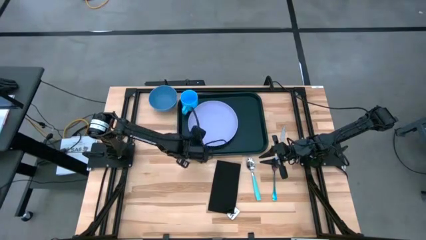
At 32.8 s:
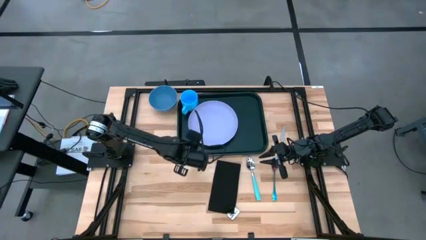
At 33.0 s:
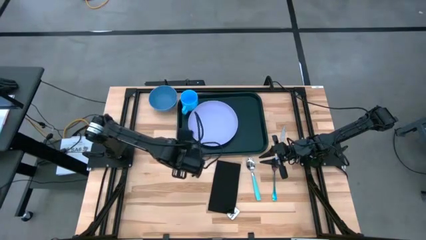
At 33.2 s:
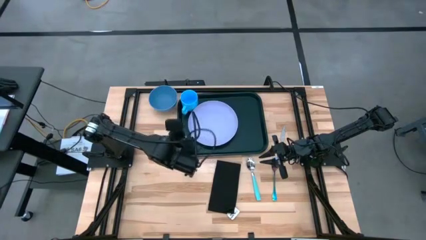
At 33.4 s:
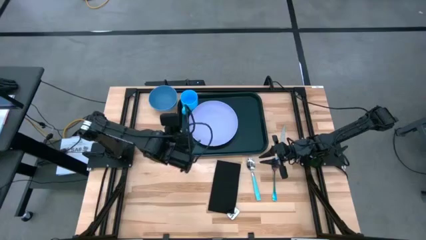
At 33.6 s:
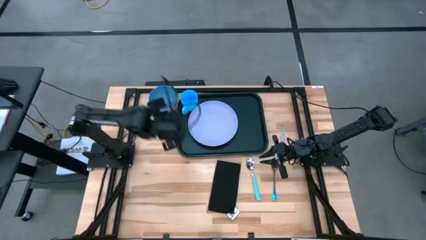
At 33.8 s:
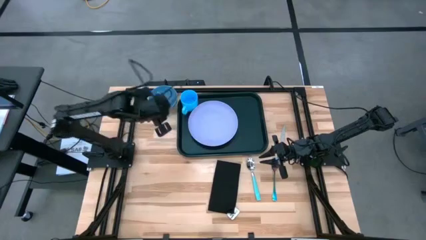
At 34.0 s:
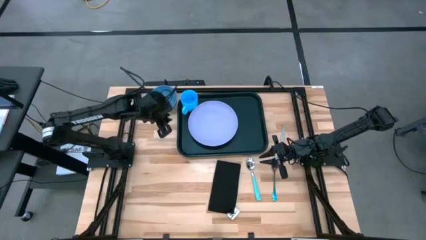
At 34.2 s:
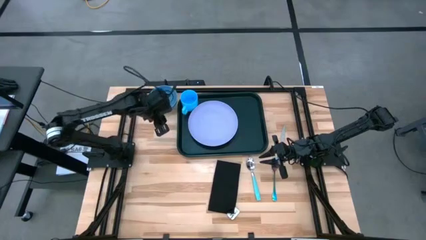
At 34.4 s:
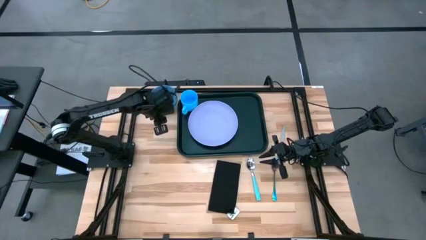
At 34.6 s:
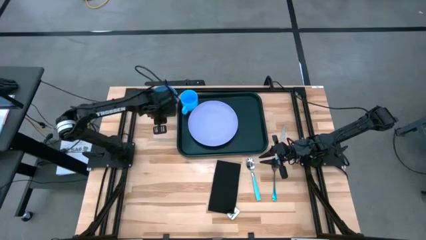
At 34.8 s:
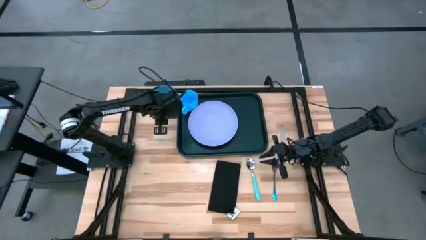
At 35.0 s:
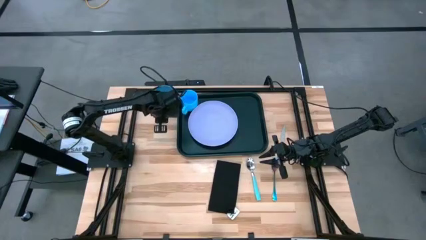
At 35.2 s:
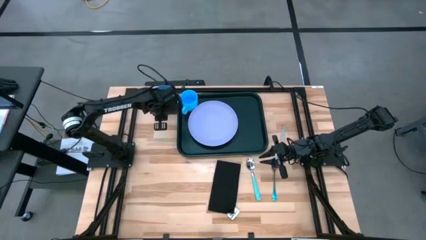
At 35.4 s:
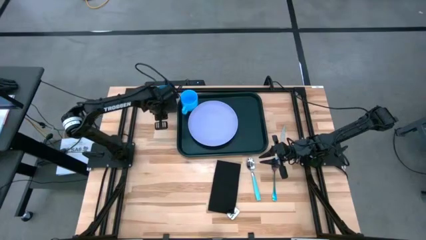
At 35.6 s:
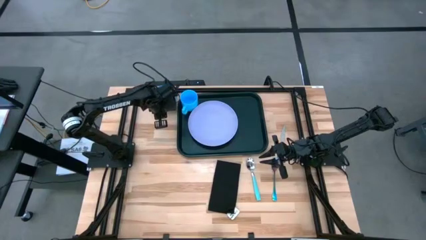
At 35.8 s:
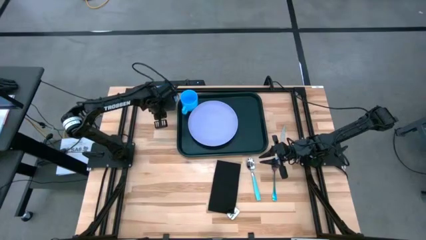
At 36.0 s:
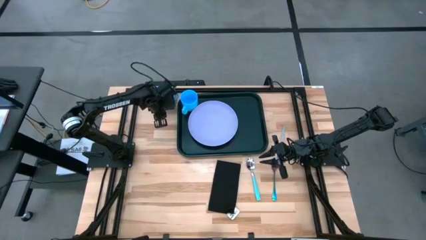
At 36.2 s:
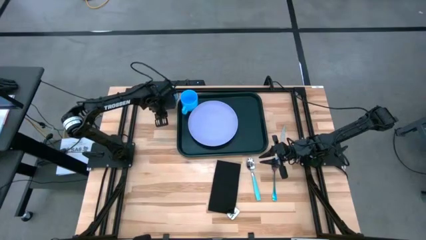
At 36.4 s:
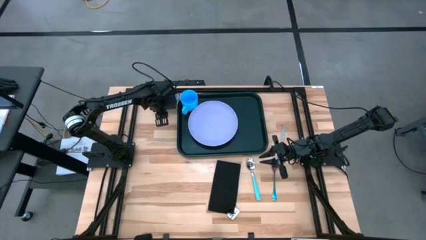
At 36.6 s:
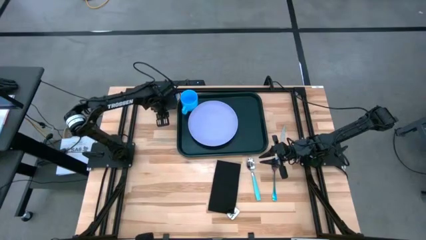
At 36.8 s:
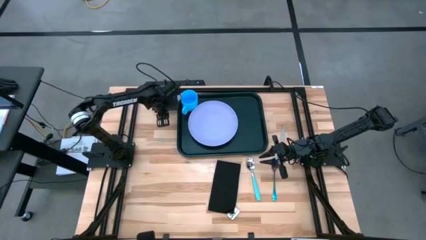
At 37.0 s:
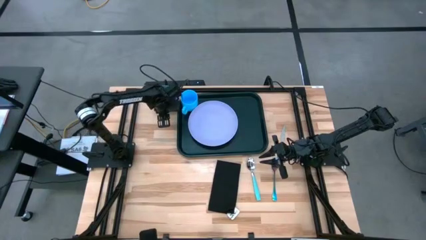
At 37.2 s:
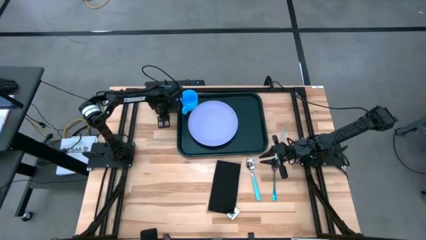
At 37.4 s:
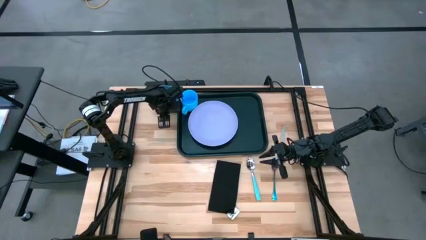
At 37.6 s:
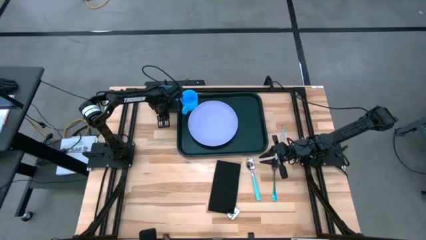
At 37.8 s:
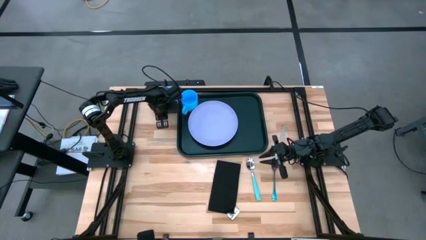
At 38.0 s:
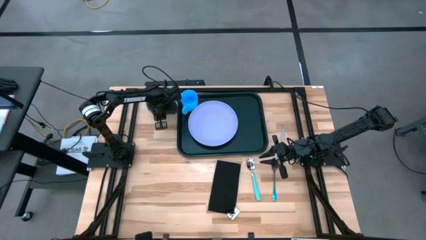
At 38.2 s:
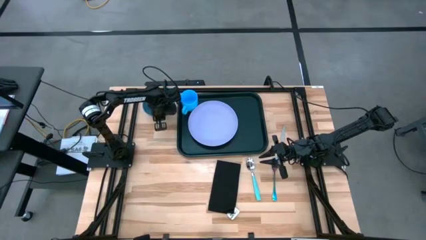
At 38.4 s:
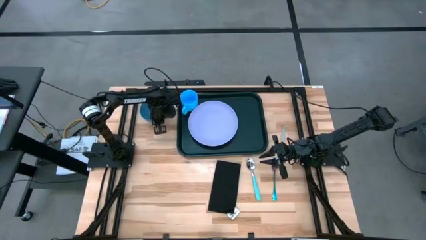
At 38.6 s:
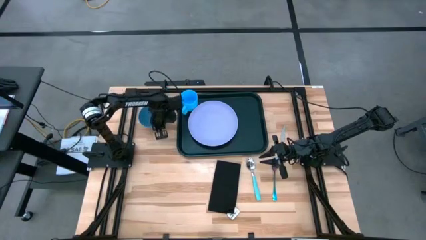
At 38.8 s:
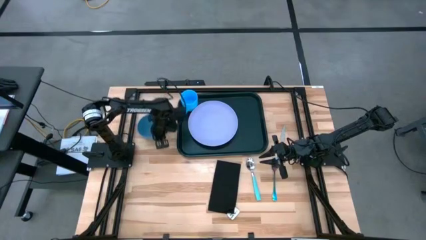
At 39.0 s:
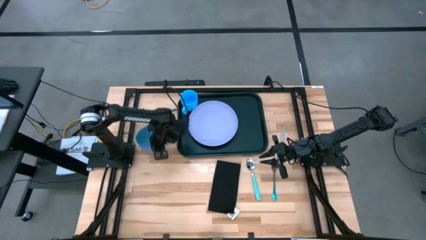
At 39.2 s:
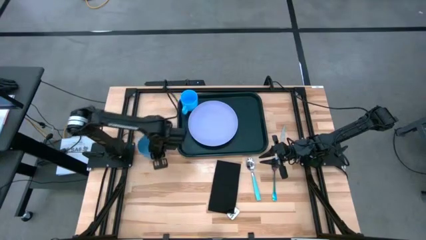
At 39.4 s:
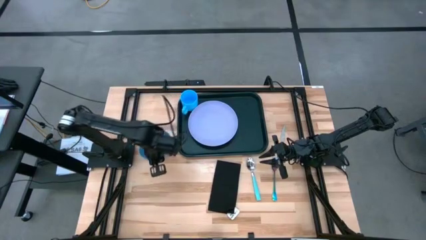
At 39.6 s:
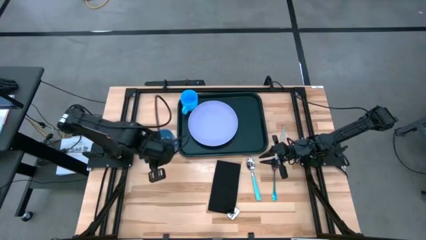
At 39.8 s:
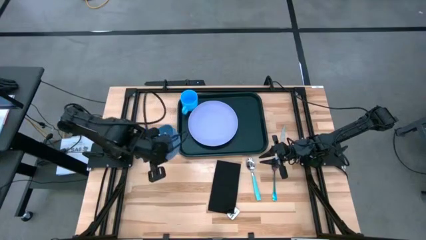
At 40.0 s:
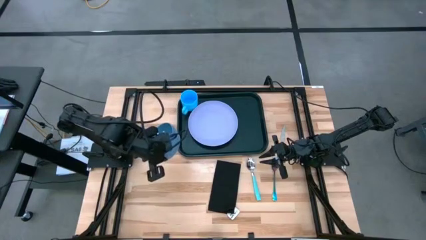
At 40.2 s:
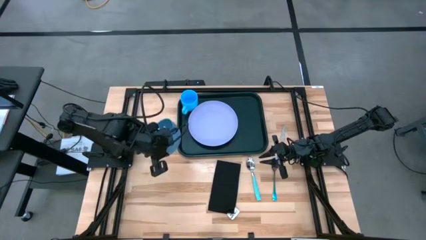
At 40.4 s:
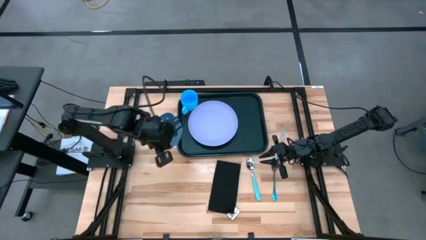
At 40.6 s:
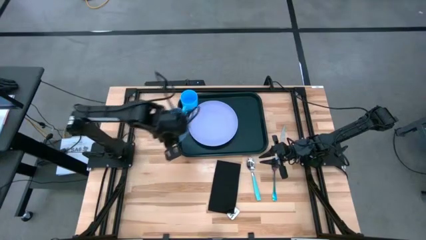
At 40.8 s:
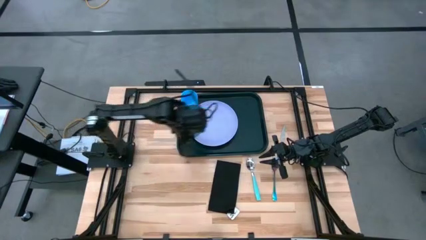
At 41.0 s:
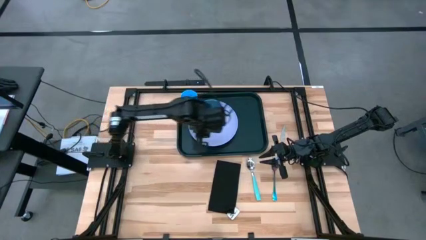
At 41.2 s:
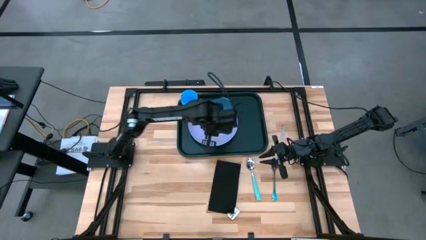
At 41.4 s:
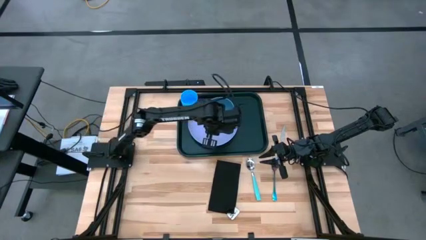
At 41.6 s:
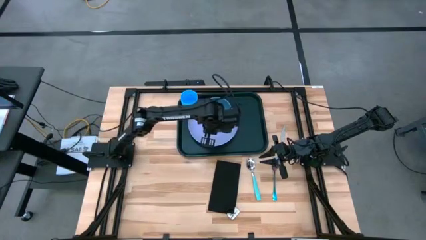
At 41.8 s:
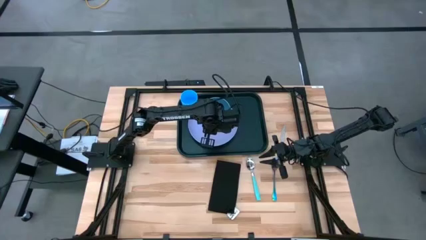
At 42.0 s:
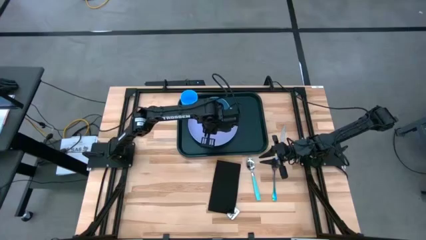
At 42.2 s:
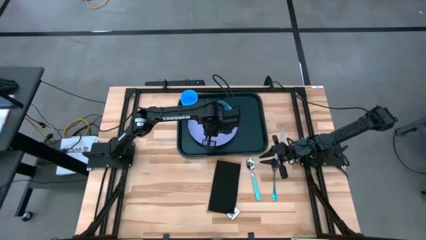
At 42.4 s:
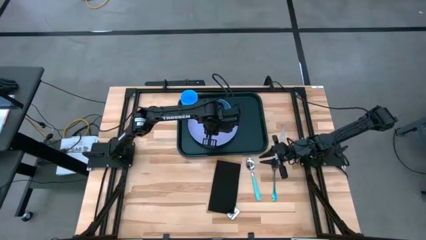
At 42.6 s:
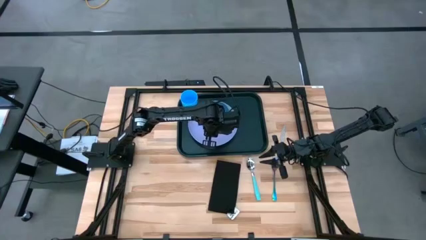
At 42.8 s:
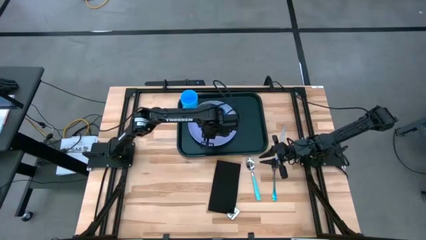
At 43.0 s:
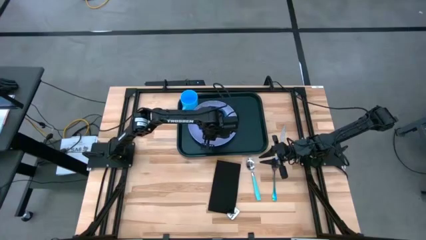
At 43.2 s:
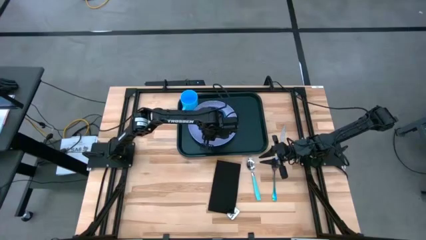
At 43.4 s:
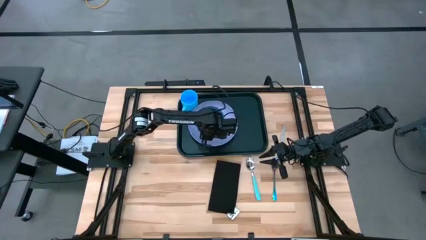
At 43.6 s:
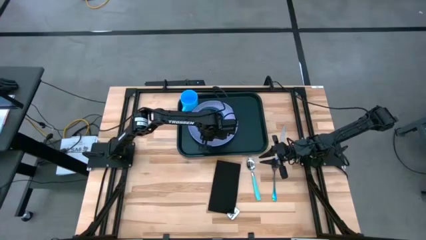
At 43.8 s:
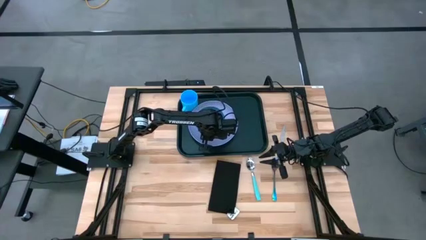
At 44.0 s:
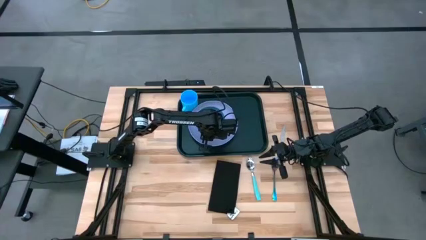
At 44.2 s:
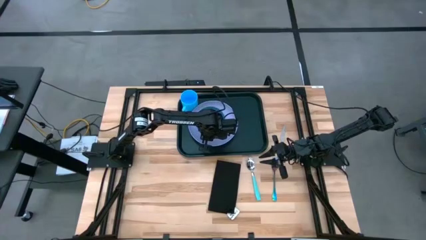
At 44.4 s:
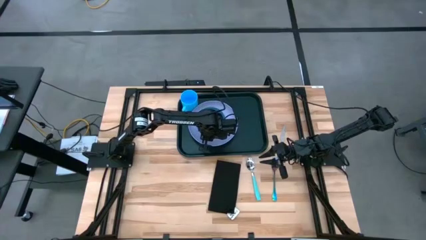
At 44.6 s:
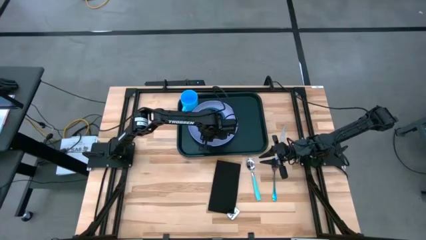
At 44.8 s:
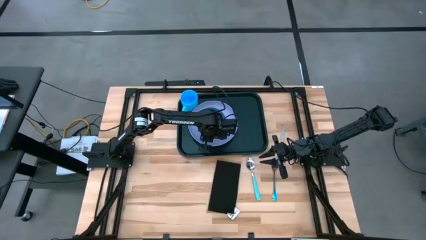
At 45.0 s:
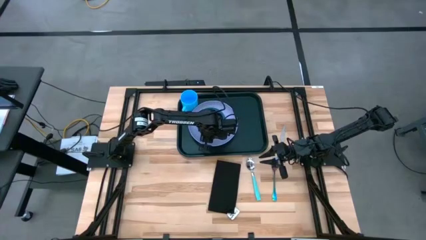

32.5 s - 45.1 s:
Task: Set up tray
Put the blue bowl on the purple plate on the black serving tray

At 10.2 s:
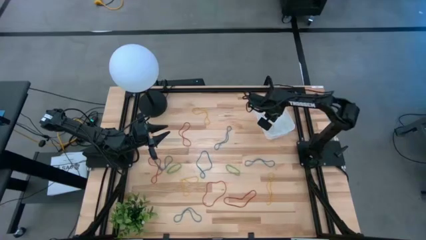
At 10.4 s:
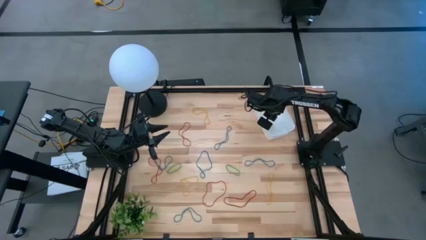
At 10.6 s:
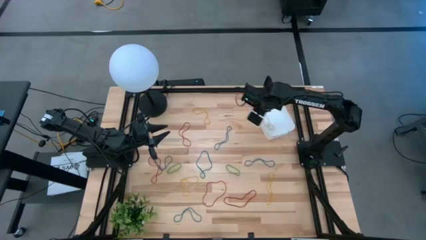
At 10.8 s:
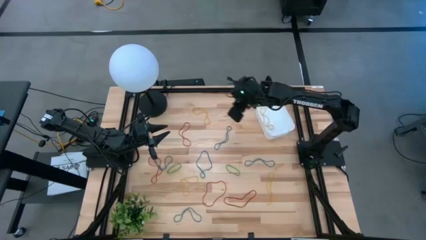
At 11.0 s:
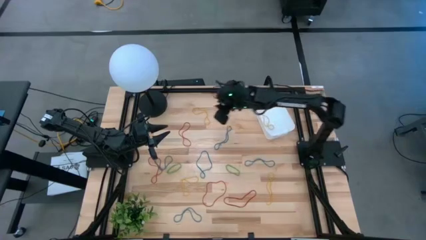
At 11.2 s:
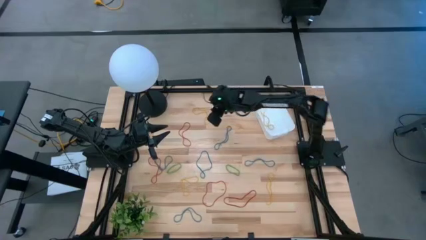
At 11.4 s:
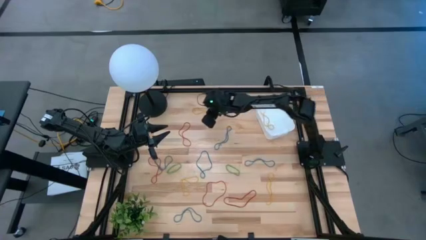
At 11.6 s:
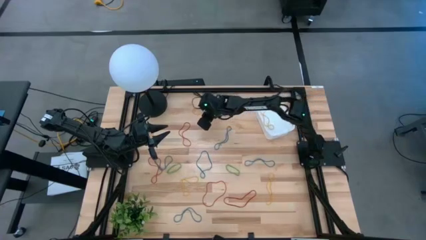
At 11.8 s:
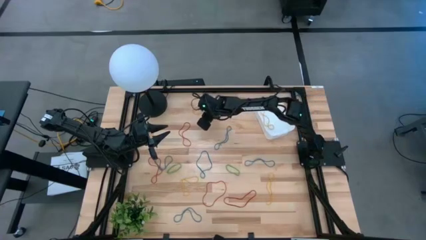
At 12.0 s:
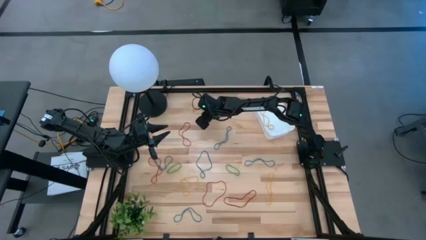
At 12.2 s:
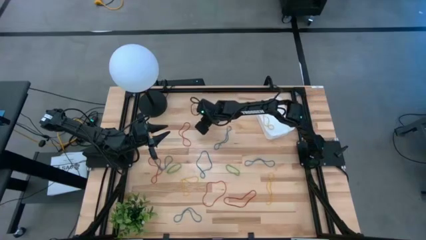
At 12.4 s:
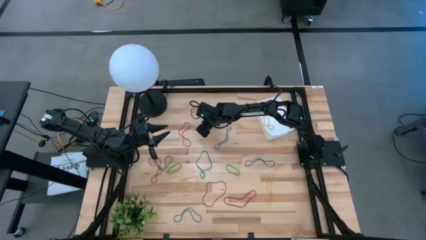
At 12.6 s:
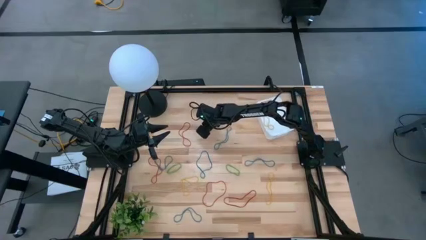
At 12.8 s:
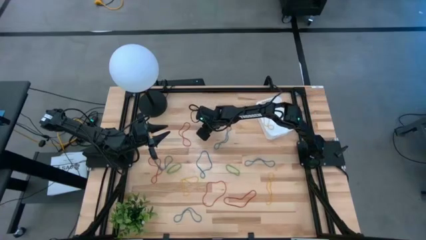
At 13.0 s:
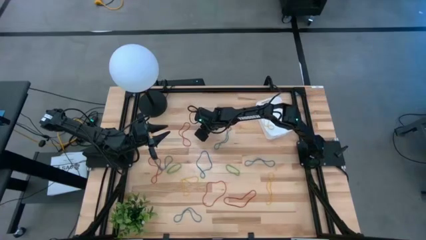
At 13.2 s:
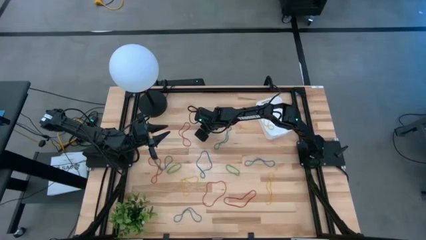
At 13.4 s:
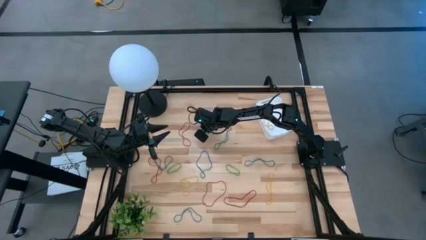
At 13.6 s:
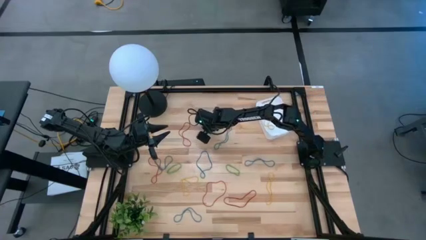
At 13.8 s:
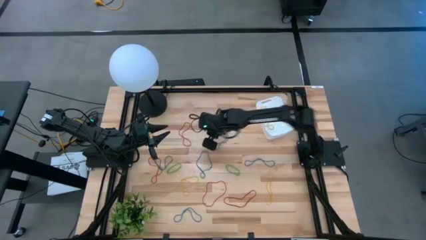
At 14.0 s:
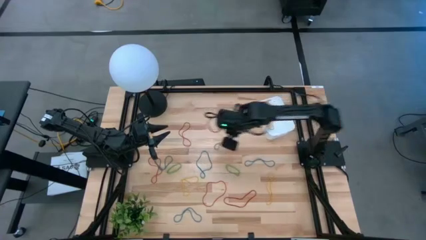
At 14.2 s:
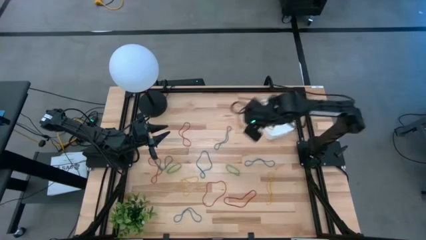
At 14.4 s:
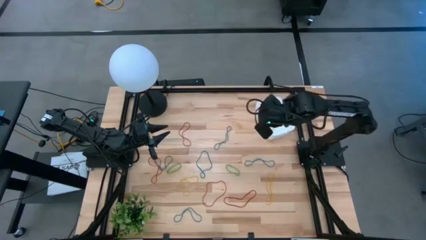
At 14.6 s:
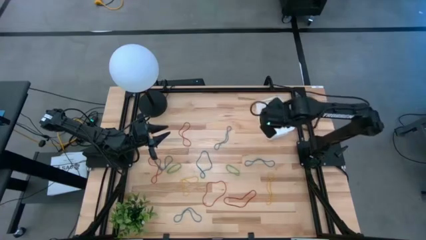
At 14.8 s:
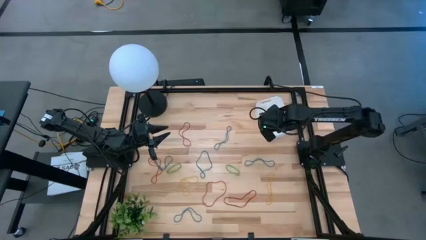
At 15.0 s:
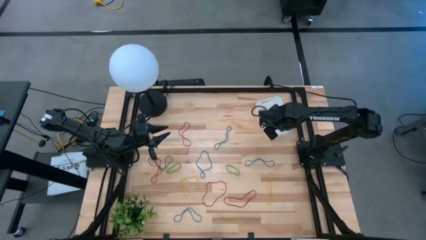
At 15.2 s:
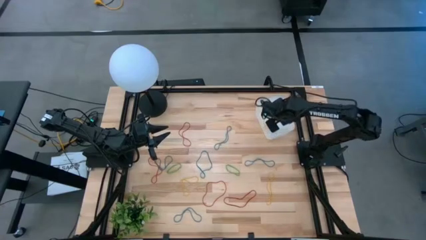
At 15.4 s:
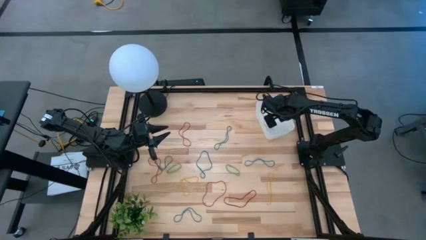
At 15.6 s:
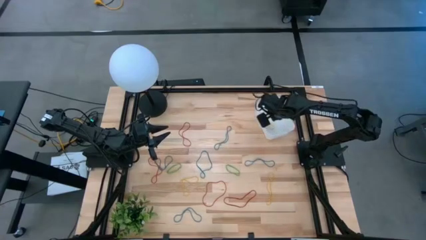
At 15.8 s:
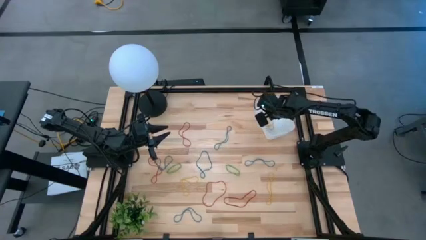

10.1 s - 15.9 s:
Task: Pick and place items into bin
Put the top yellow rubber band into the white bin
